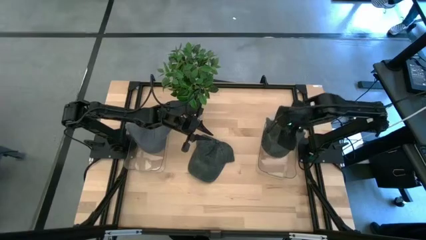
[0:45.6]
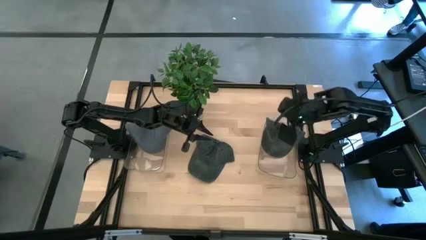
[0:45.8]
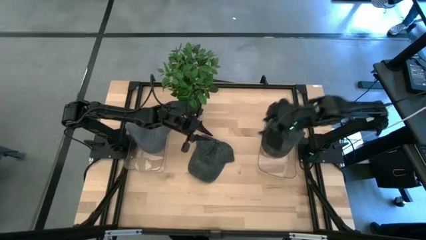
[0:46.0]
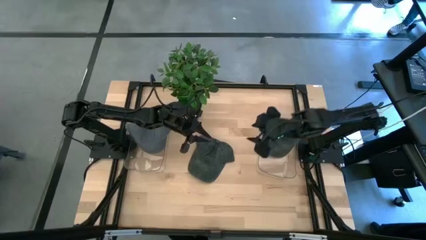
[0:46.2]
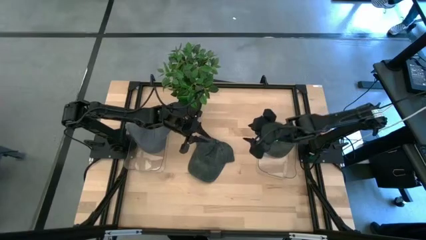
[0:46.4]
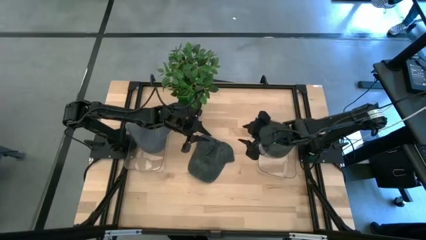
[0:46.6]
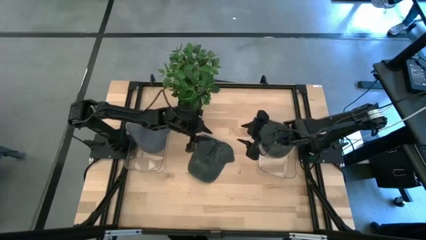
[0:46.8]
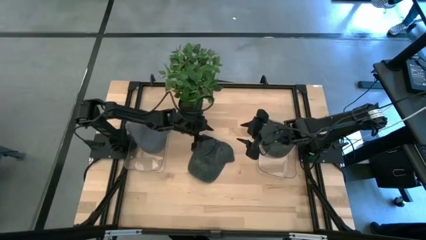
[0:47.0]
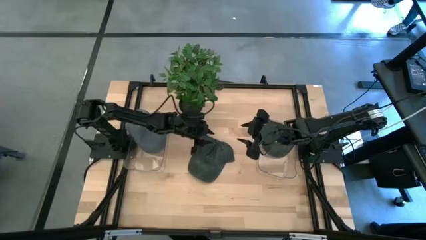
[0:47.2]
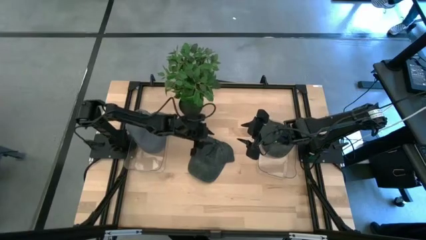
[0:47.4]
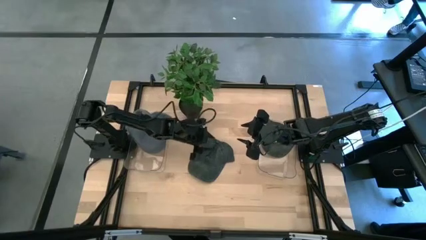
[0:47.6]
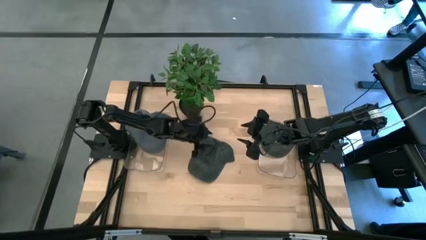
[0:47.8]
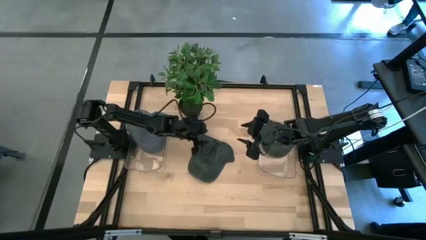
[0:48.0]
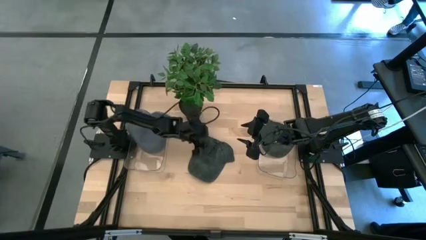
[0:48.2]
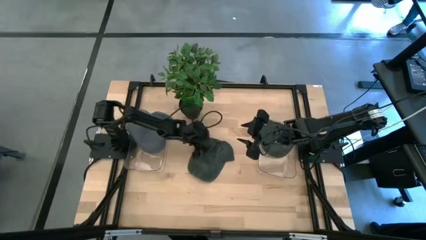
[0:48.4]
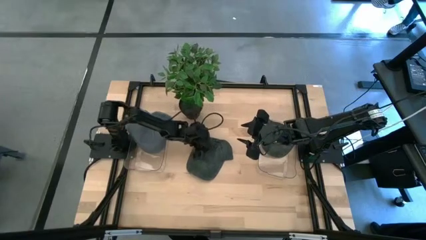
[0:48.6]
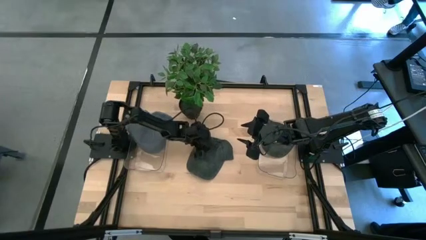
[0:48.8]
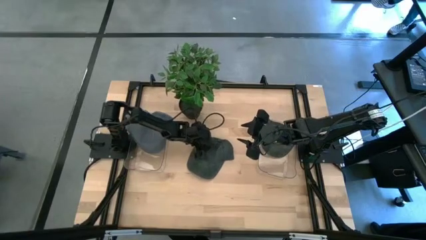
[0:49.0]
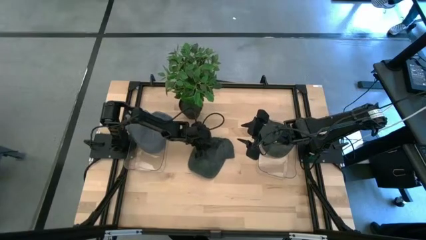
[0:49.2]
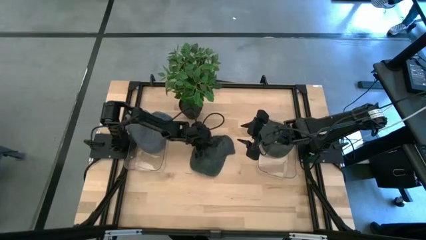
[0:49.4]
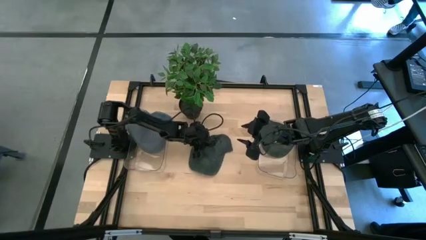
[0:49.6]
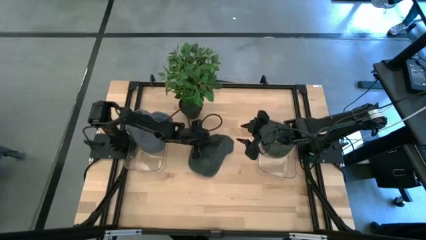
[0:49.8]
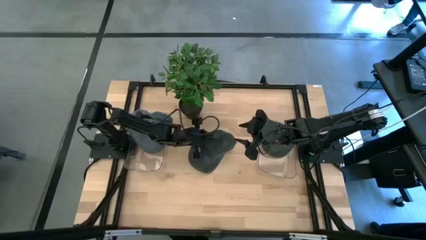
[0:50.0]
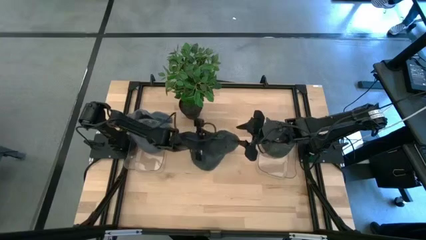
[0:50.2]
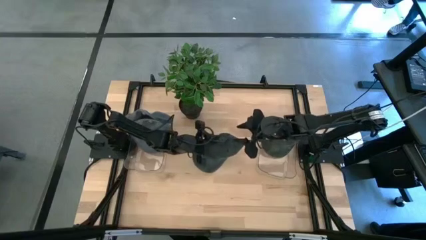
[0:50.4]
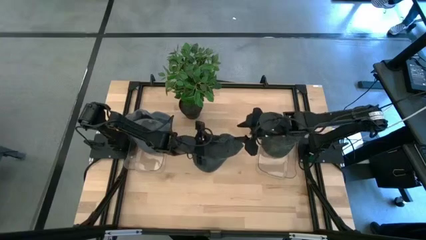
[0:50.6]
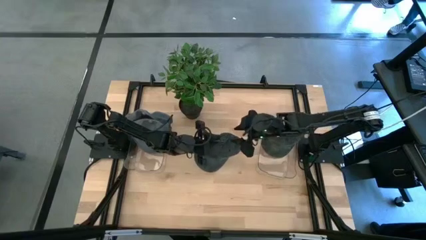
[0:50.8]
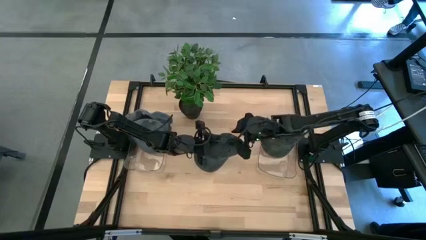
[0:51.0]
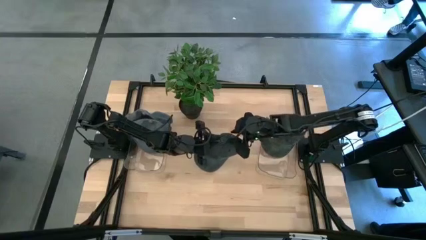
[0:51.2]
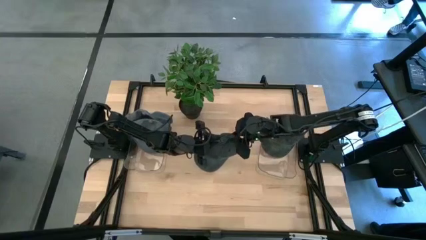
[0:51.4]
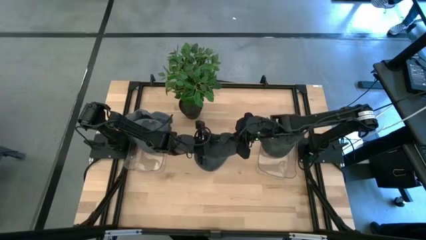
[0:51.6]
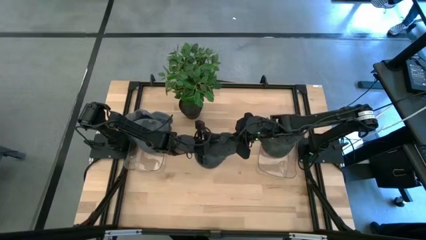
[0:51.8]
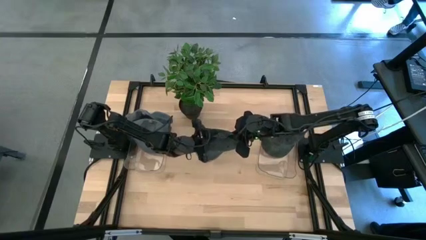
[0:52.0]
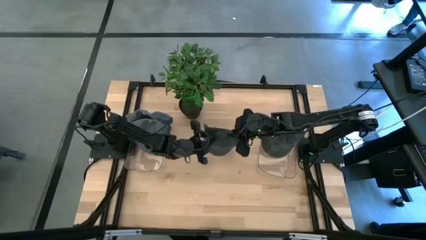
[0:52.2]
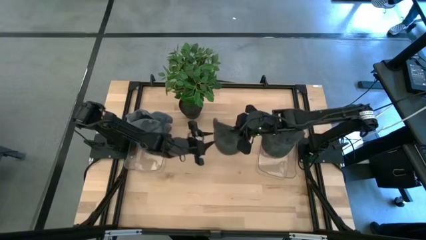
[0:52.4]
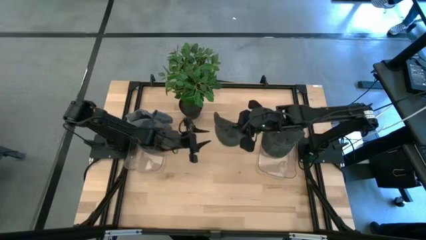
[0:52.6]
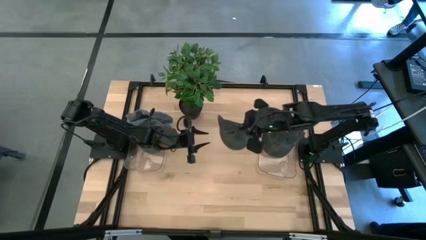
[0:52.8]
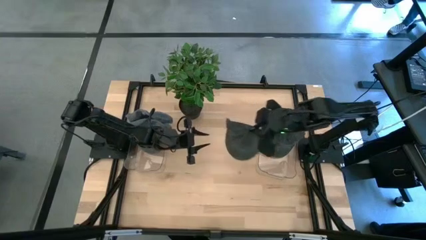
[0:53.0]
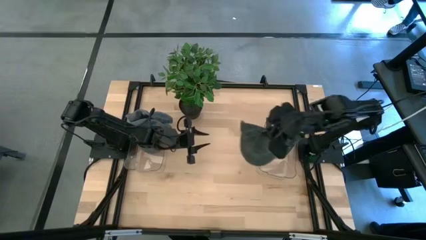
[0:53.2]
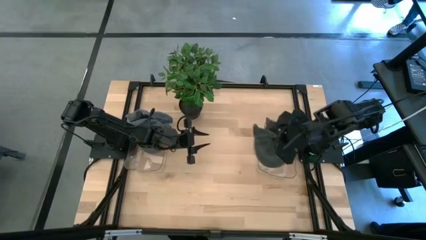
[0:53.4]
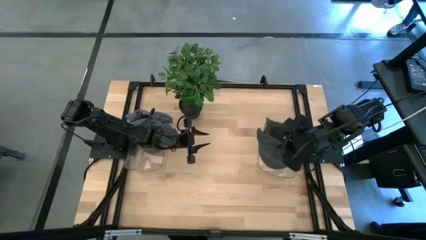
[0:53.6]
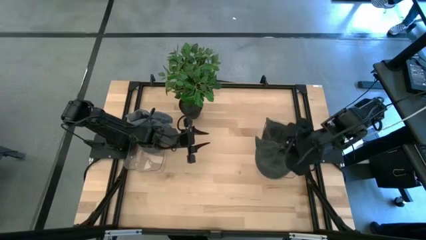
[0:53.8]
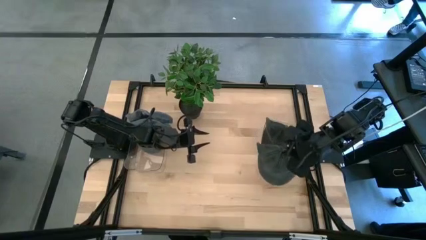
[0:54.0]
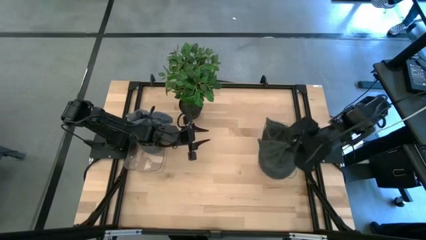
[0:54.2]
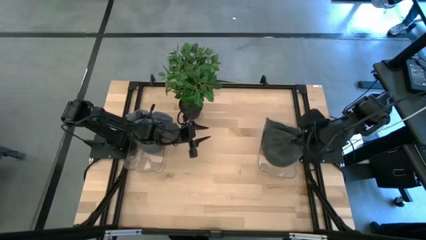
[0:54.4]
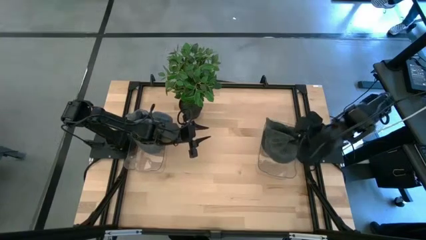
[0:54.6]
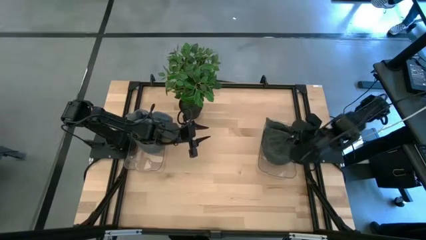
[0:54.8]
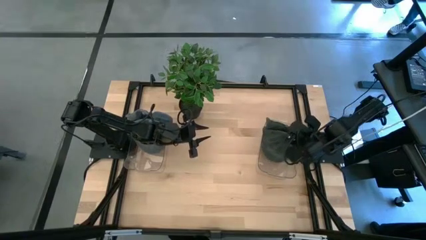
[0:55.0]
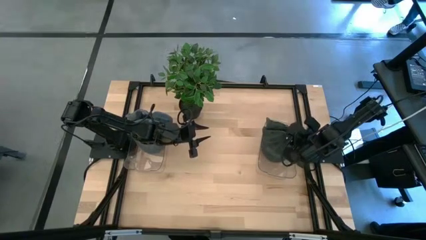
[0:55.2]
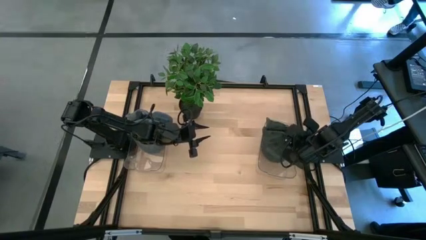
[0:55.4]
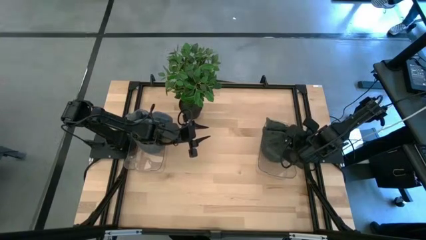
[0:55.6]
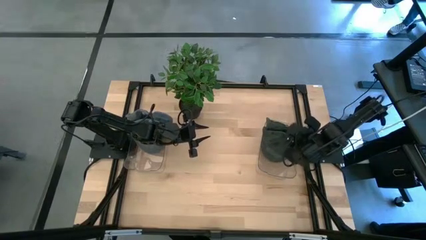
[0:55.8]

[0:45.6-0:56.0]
Task: Pick & Place hat
Put the black cap into the right transparent bin

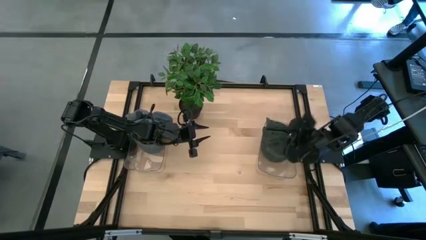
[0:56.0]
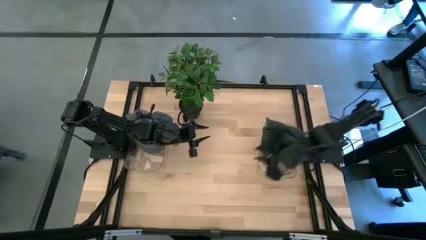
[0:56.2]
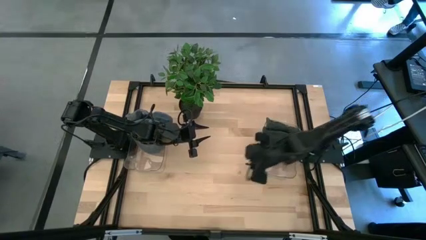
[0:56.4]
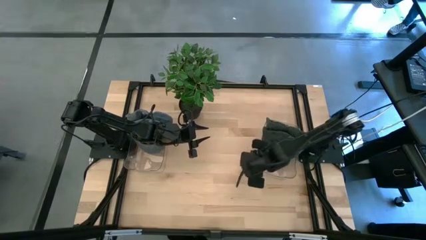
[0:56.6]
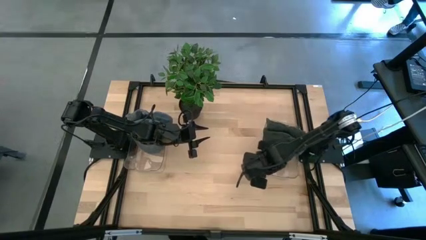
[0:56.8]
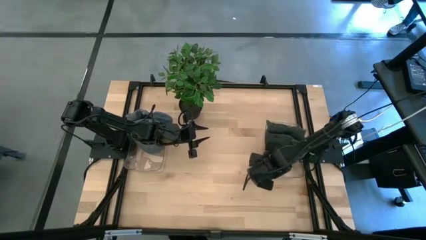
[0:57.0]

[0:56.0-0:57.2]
Adjust the right transparent bin

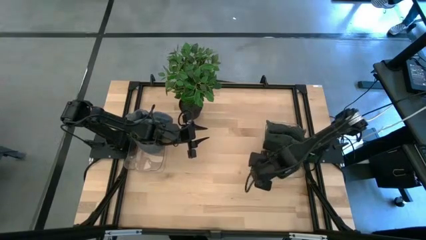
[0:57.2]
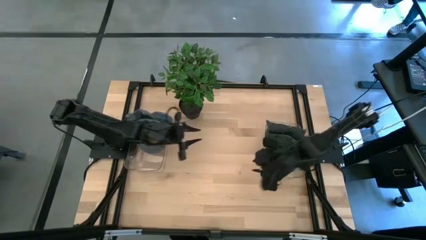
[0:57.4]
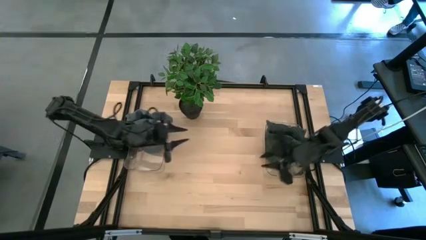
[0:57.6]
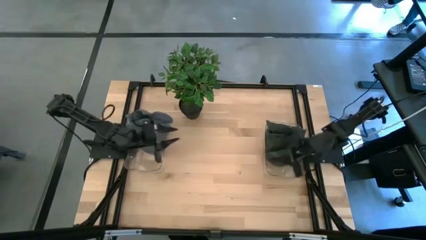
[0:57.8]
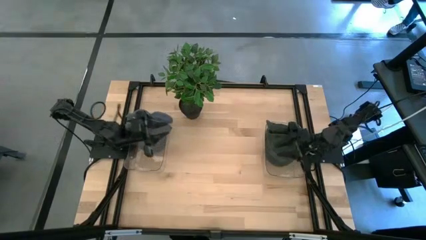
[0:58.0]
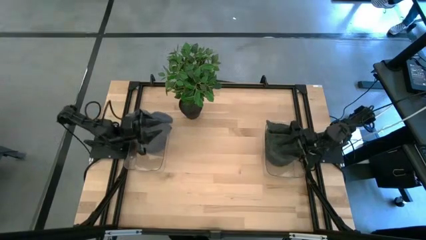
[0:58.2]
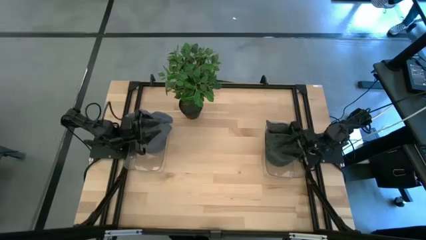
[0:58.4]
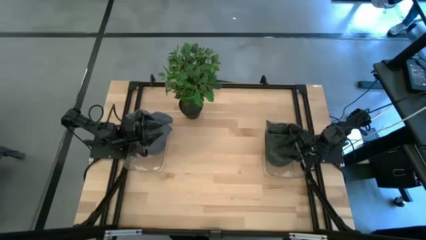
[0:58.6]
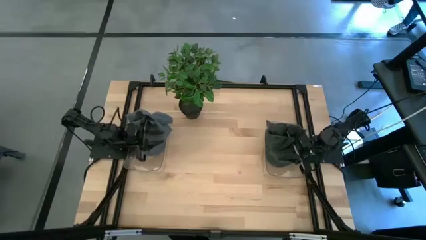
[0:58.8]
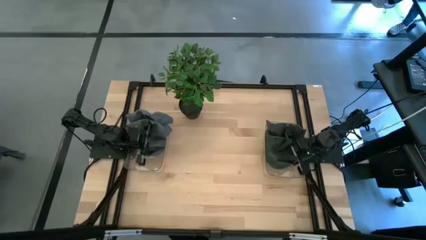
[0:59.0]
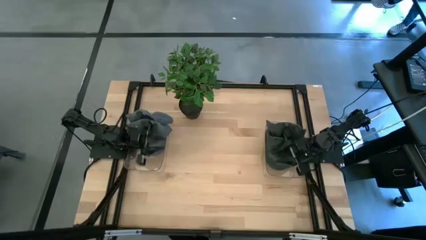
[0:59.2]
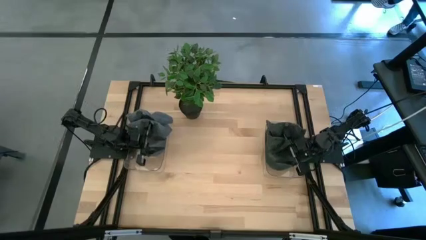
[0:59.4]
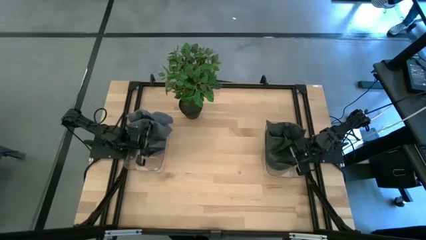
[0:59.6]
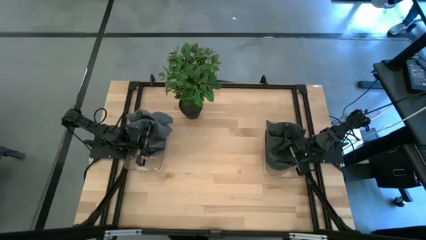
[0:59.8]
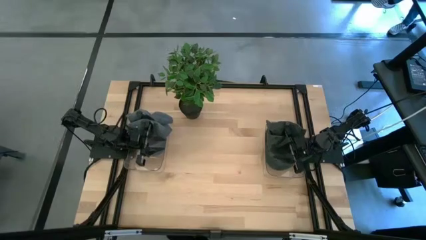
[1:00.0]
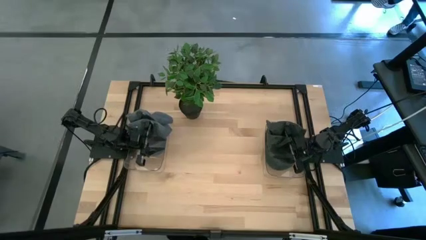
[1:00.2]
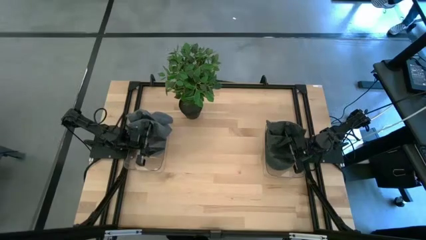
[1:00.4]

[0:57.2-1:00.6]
Return to Home Position
